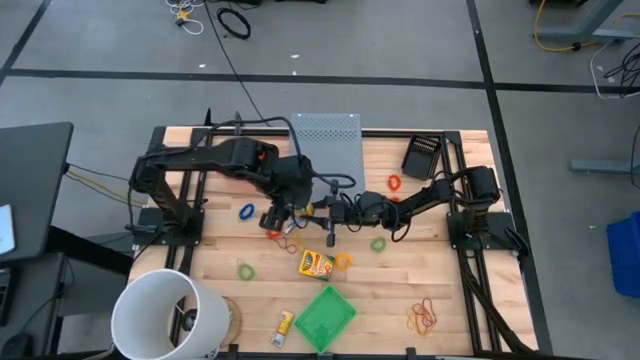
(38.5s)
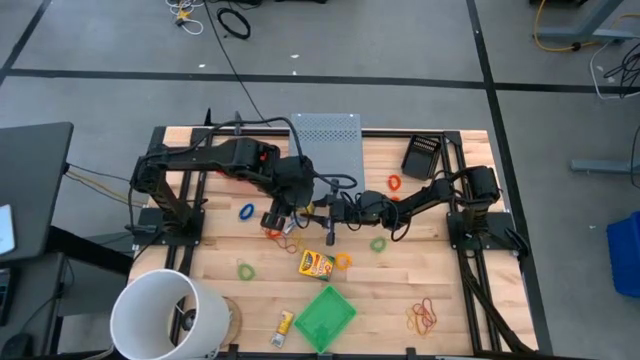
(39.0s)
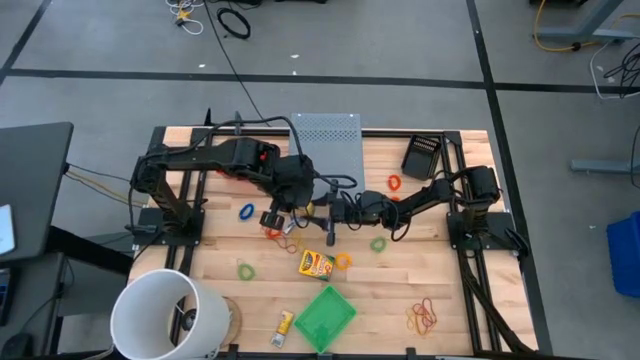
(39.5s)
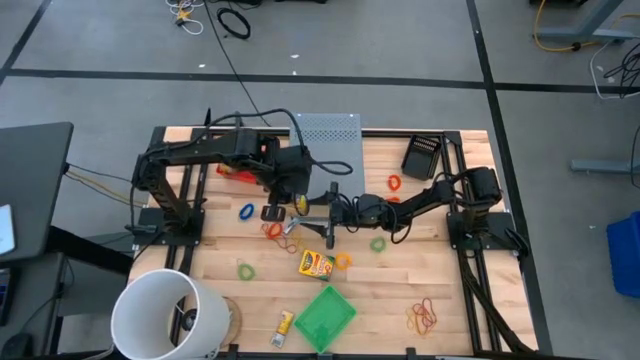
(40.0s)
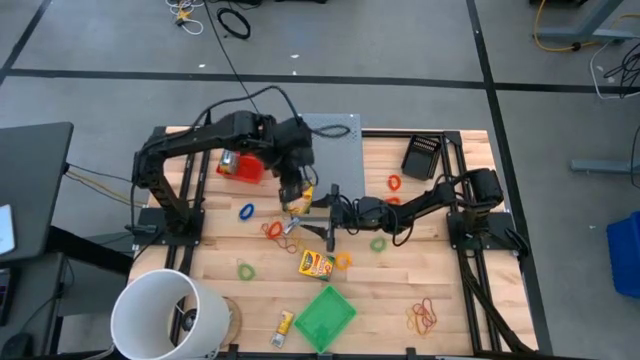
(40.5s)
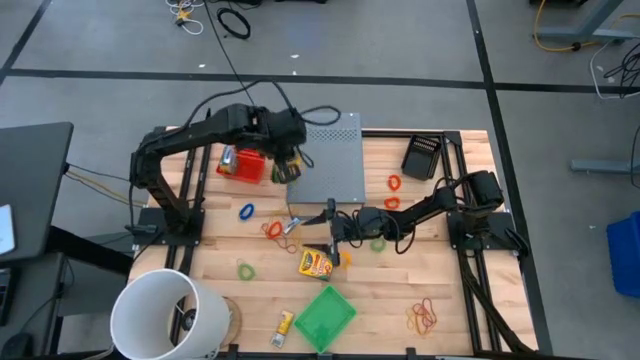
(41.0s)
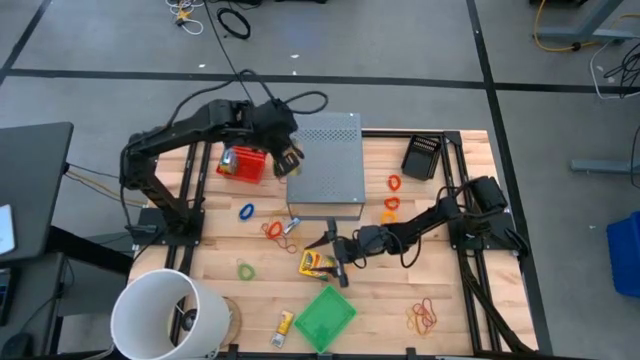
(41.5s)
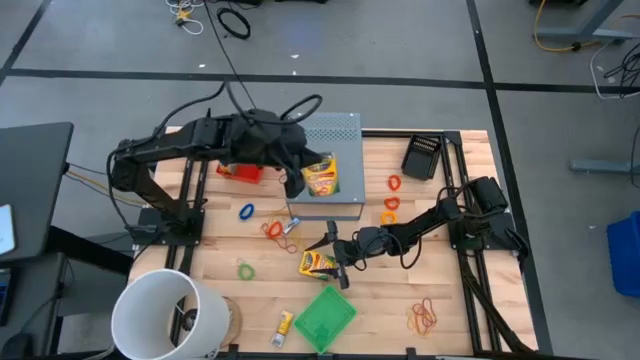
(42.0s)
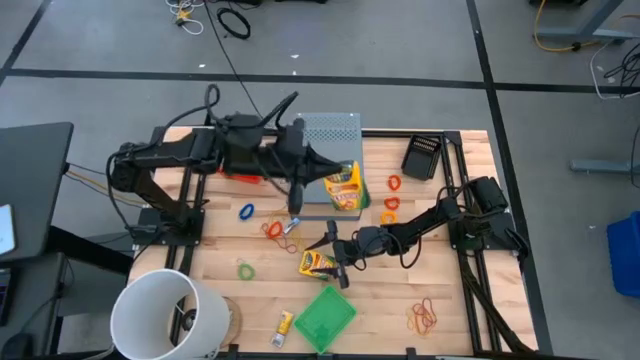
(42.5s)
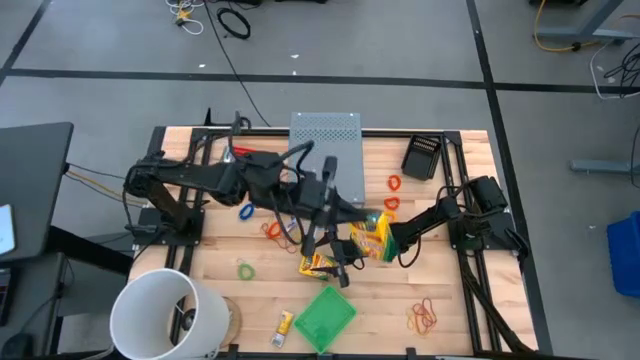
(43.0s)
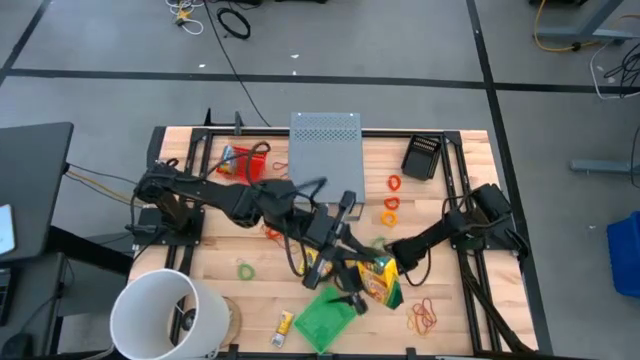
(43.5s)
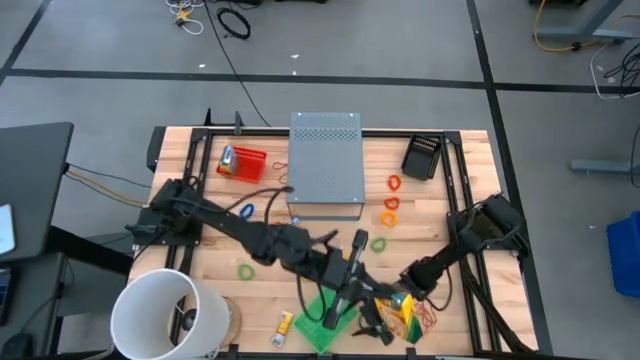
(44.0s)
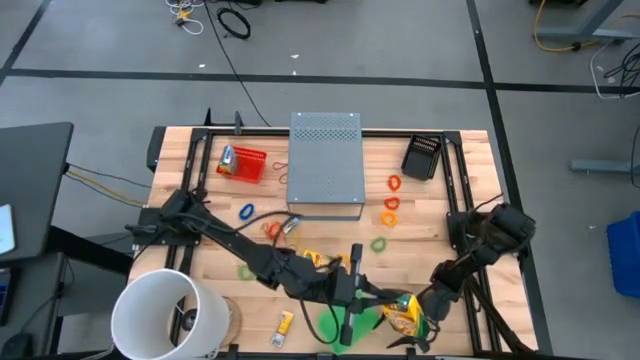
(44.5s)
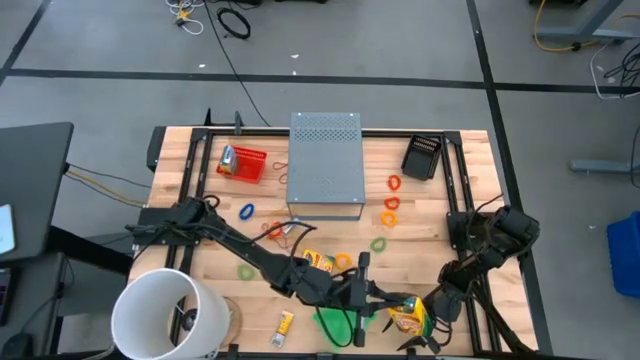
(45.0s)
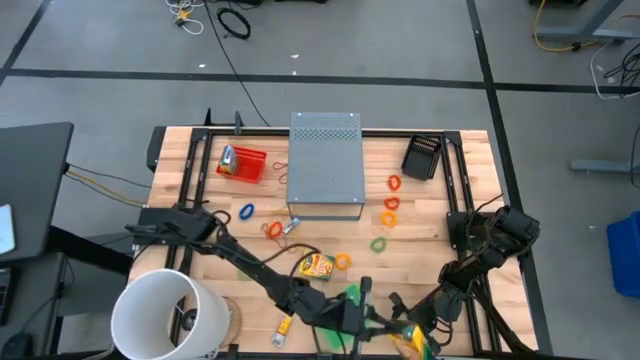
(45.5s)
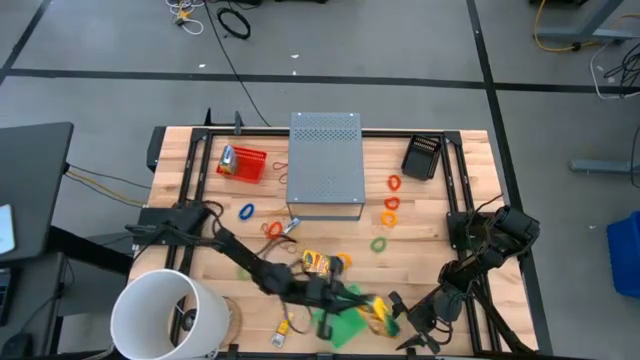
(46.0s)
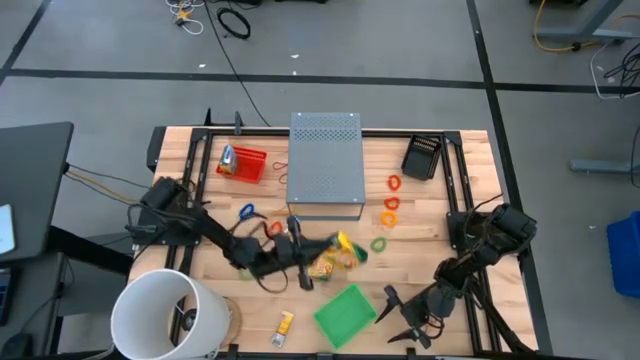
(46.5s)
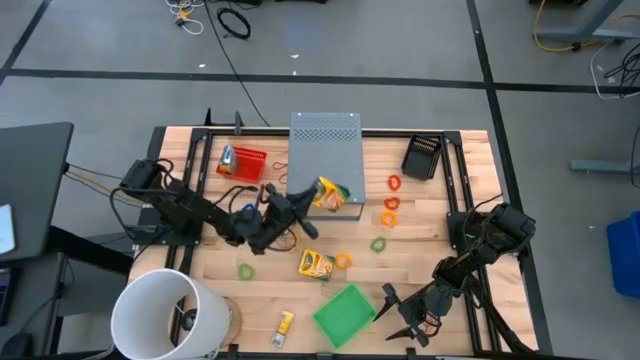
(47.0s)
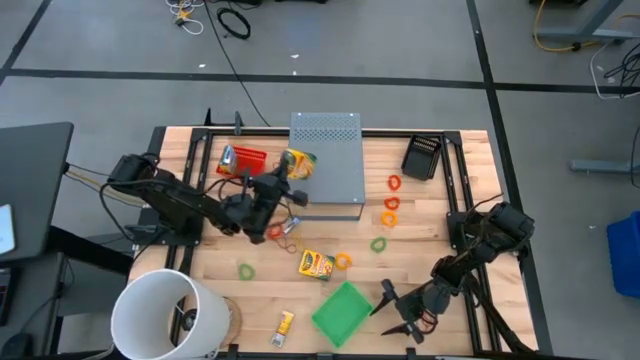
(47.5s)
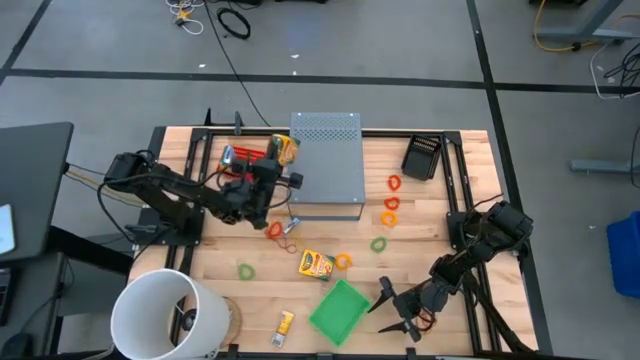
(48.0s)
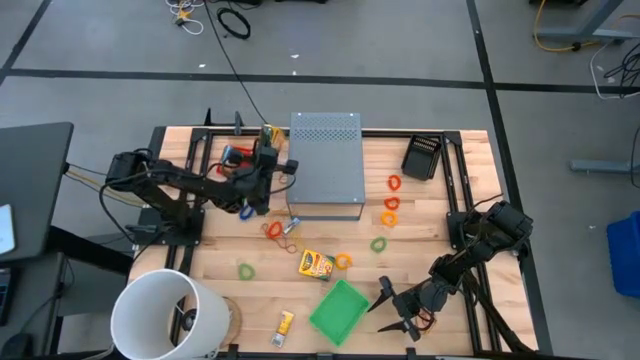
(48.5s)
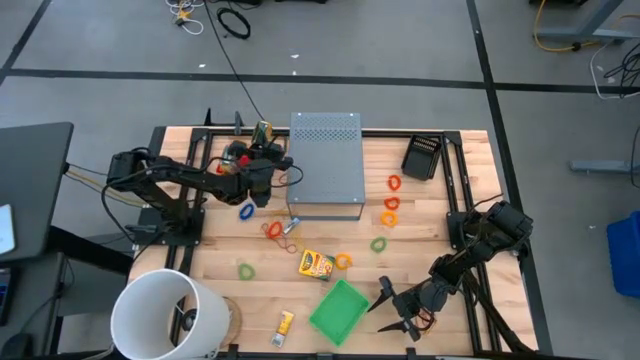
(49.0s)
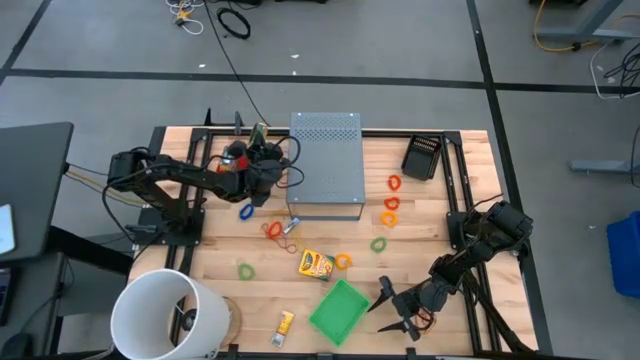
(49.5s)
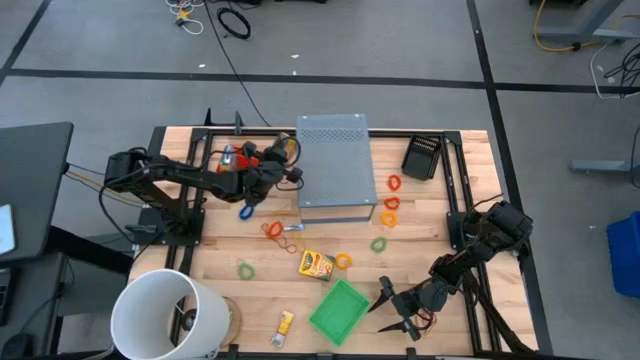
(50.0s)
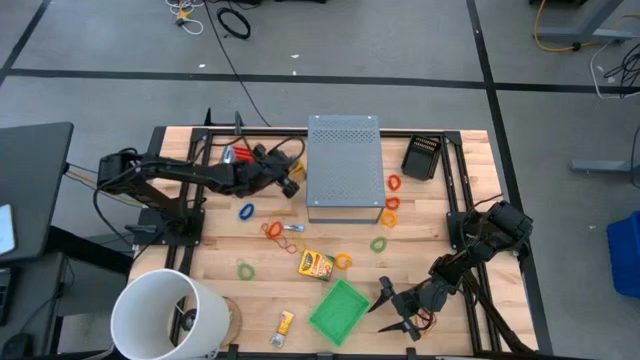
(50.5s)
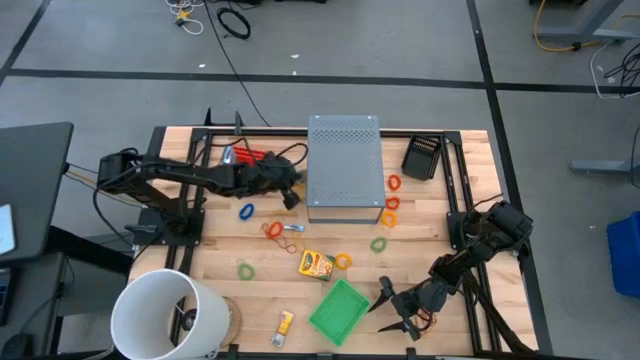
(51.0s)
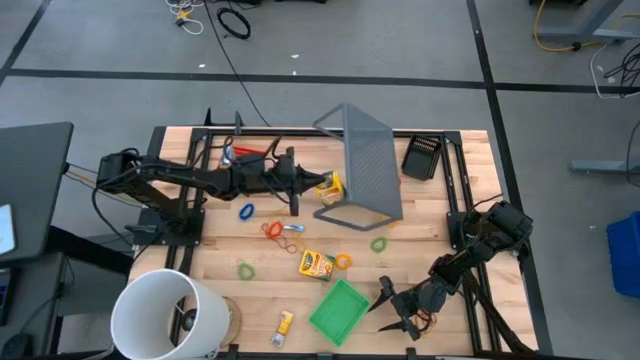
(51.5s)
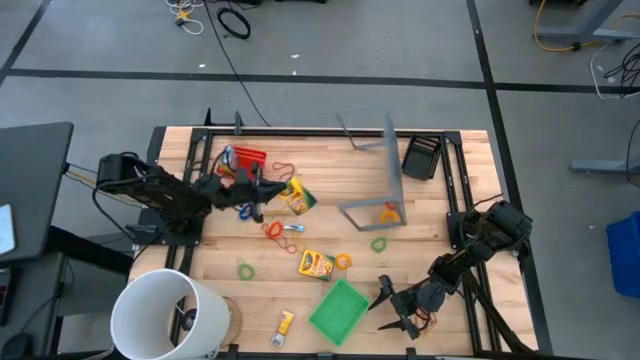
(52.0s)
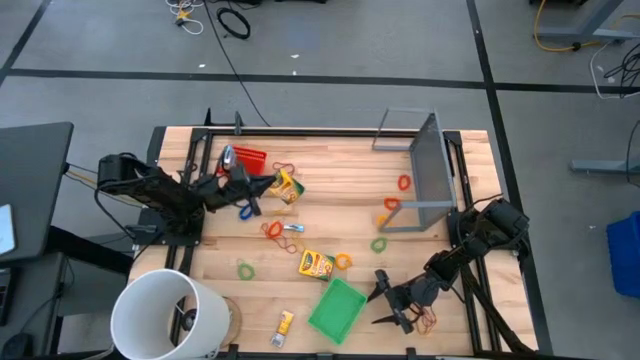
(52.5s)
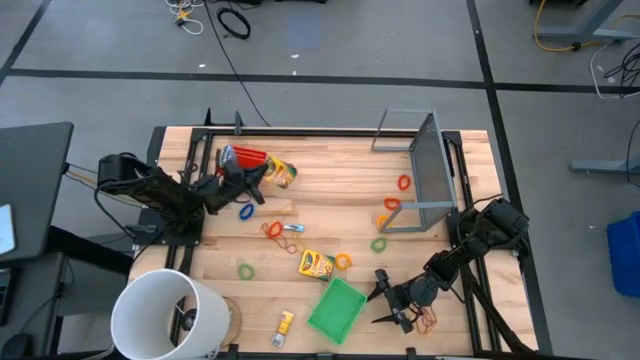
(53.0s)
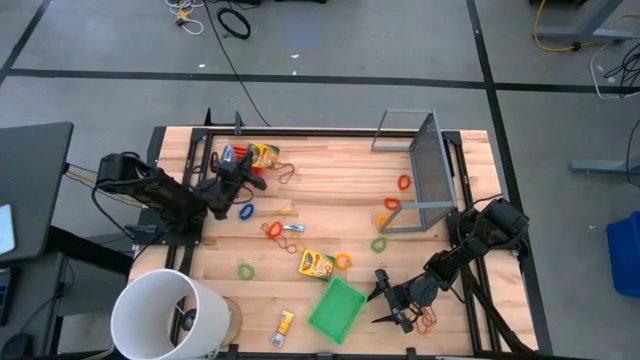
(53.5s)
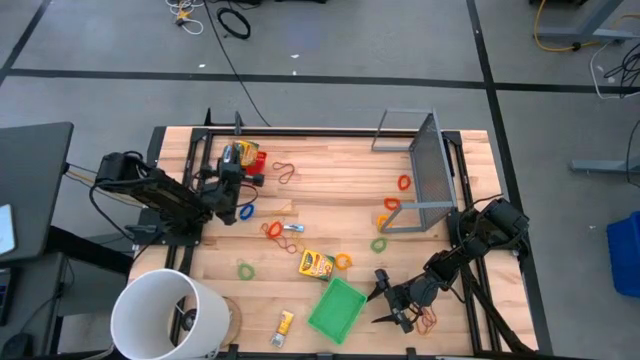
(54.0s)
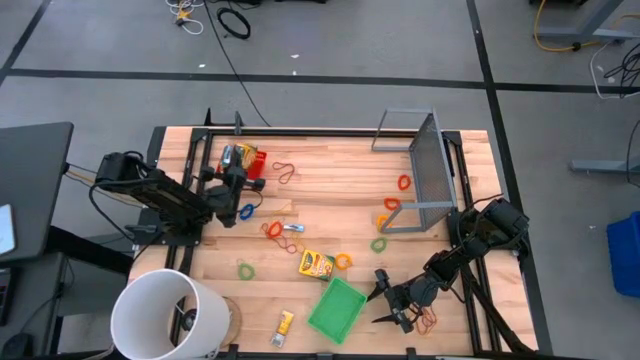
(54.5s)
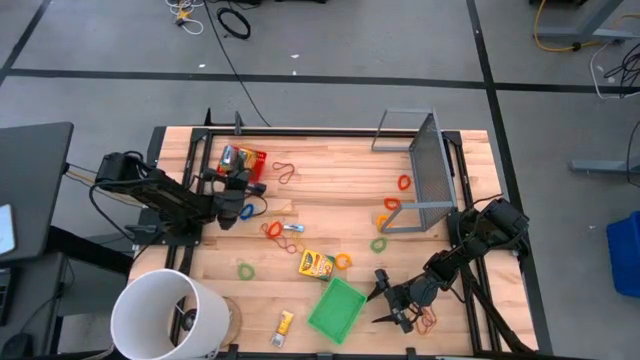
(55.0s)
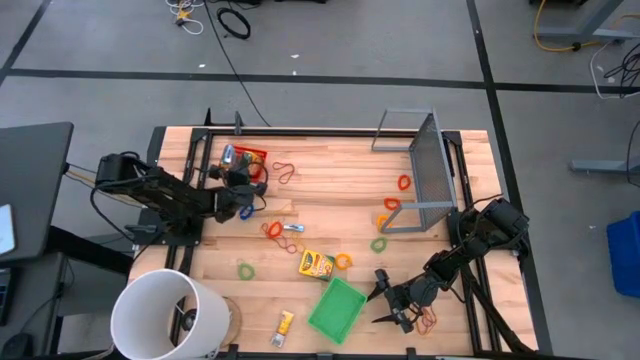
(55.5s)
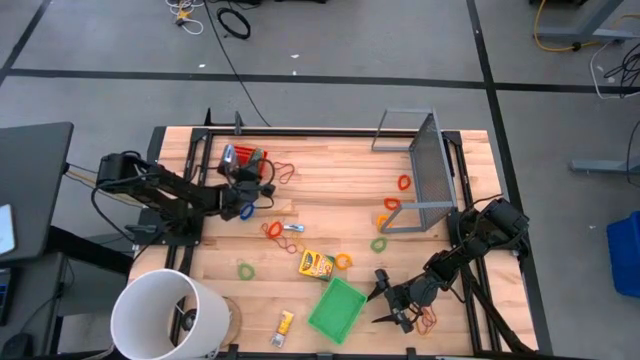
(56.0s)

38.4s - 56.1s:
Task: Pick & Place Office Desk Supplies
Put the yellow crayon box into the red basket

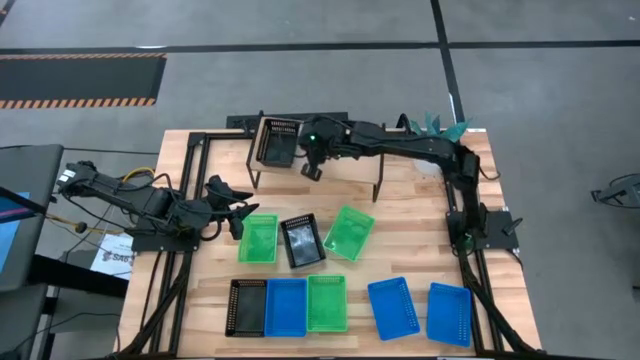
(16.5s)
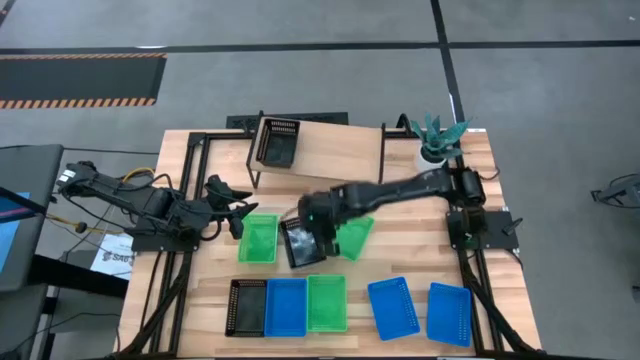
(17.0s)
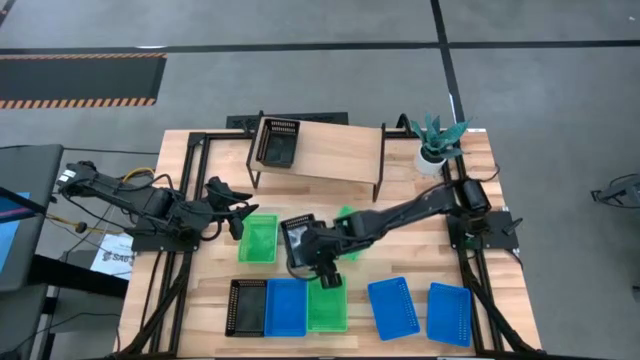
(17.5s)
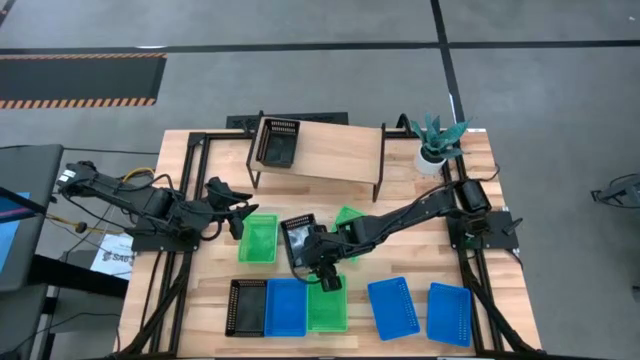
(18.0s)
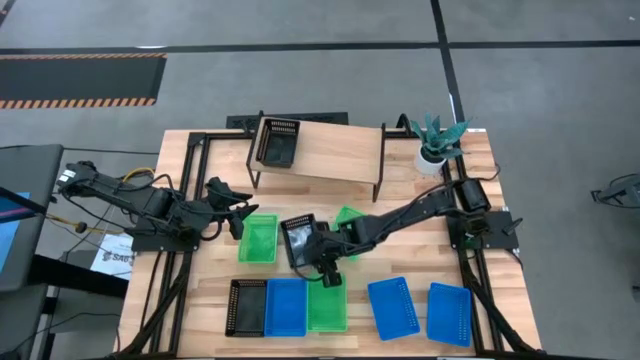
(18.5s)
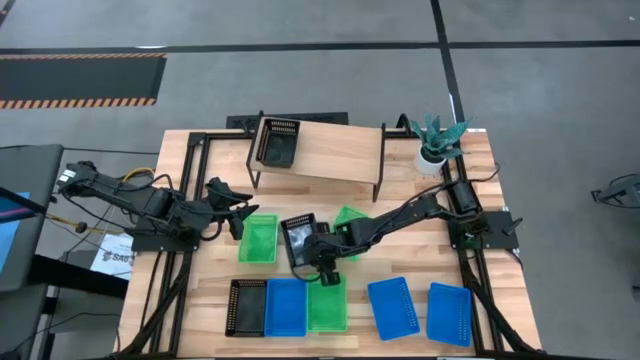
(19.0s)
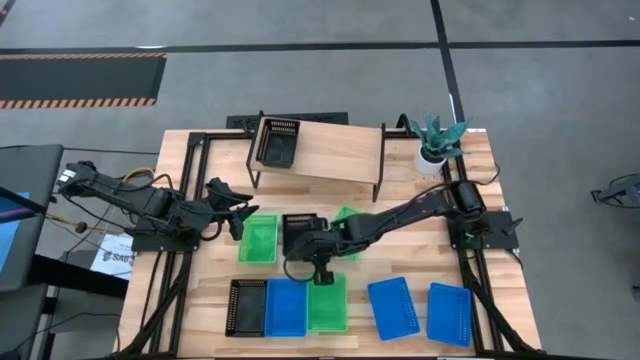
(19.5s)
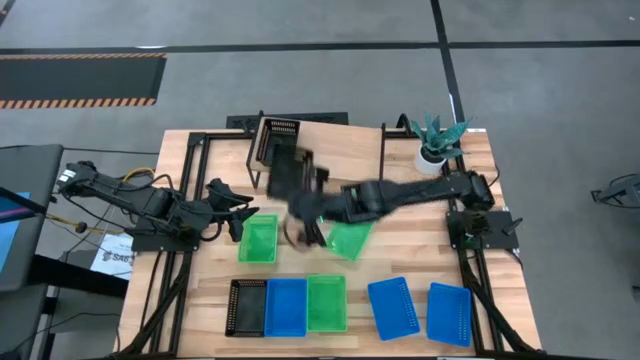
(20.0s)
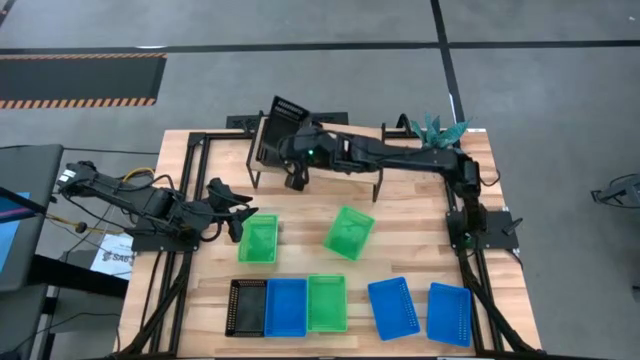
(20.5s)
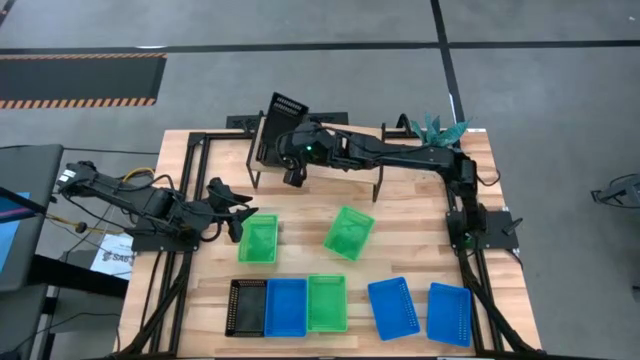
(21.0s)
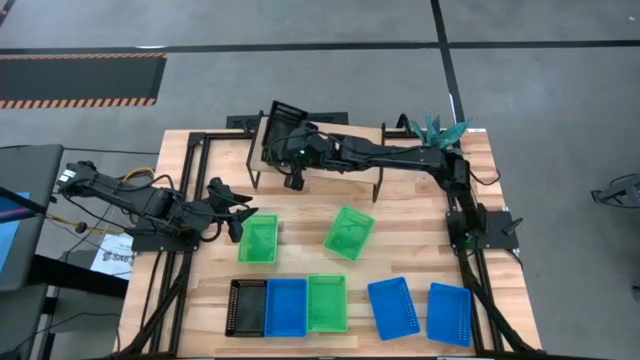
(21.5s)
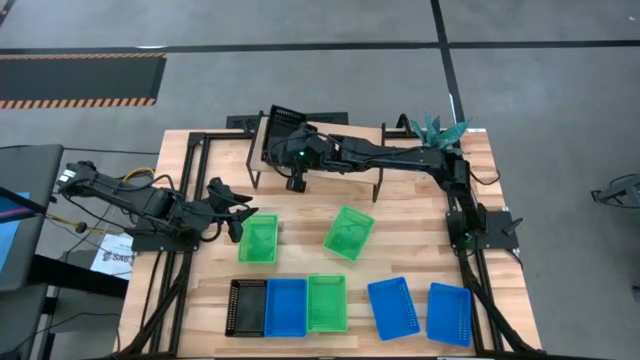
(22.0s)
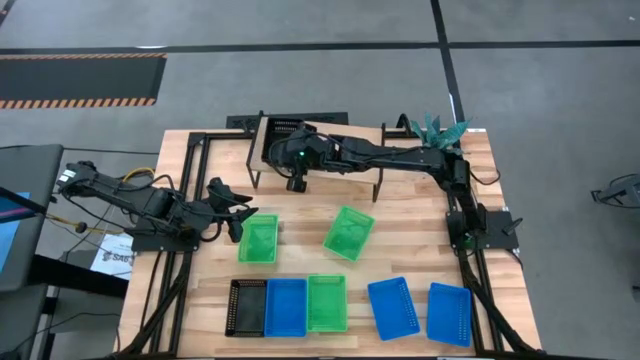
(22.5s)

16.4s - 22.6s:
Task: Stack baskets on shelf by color
Stack the top black bin on the black bin
